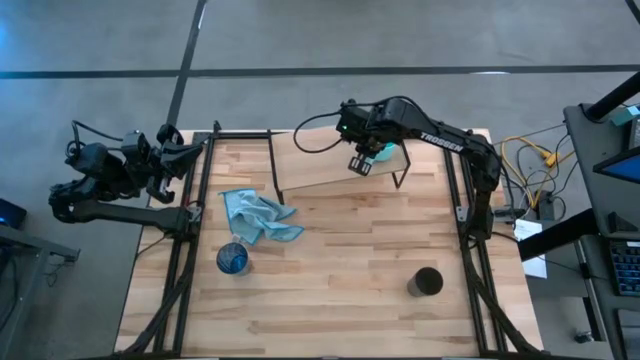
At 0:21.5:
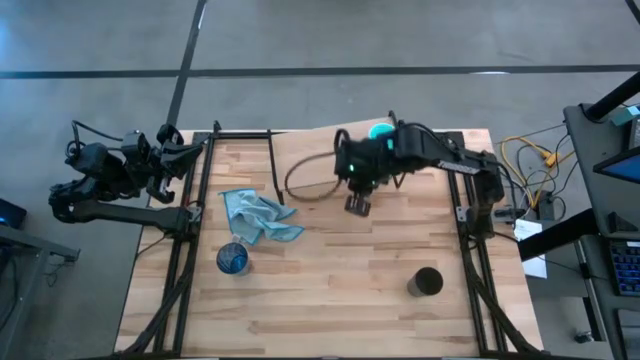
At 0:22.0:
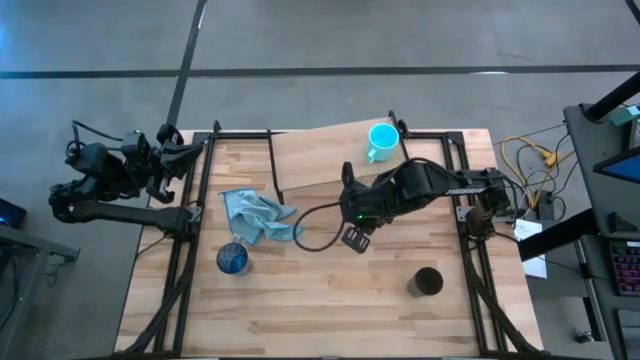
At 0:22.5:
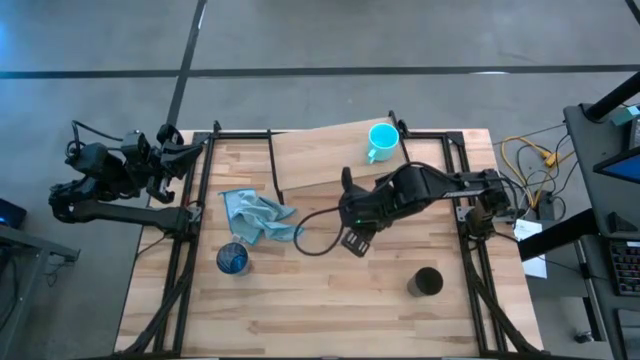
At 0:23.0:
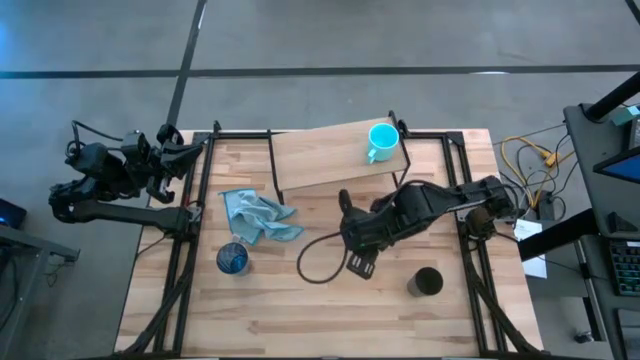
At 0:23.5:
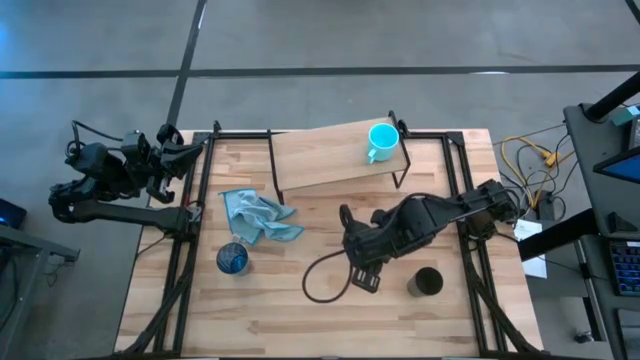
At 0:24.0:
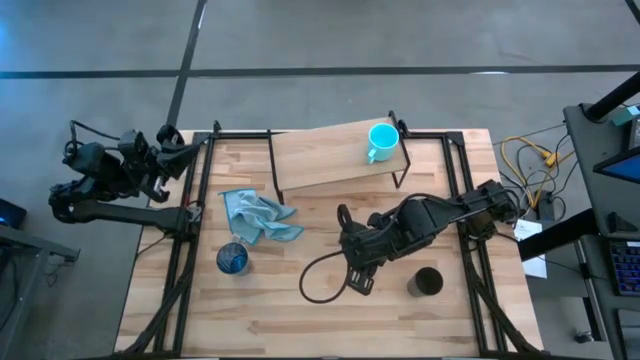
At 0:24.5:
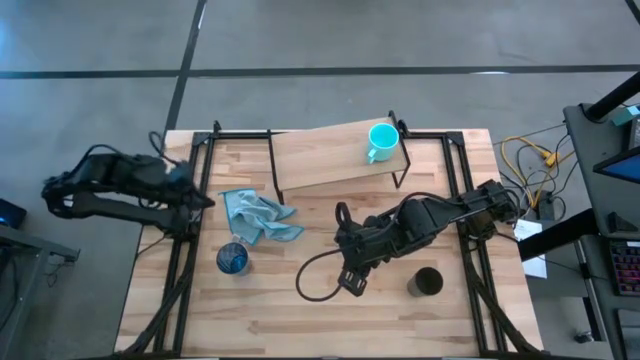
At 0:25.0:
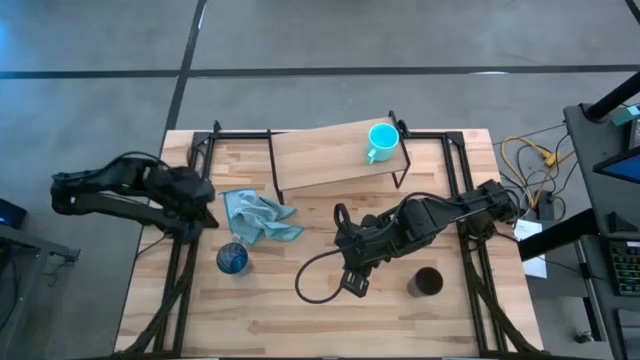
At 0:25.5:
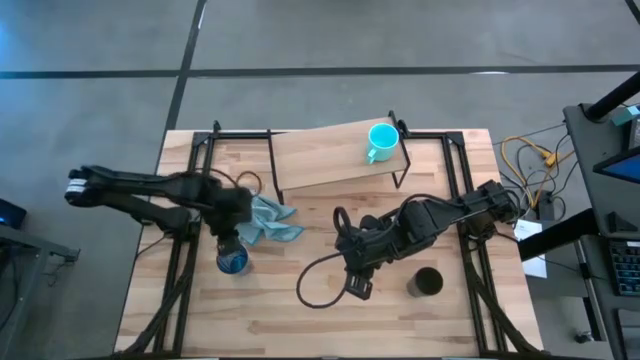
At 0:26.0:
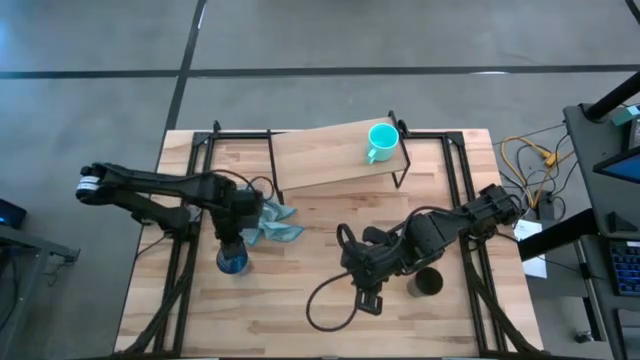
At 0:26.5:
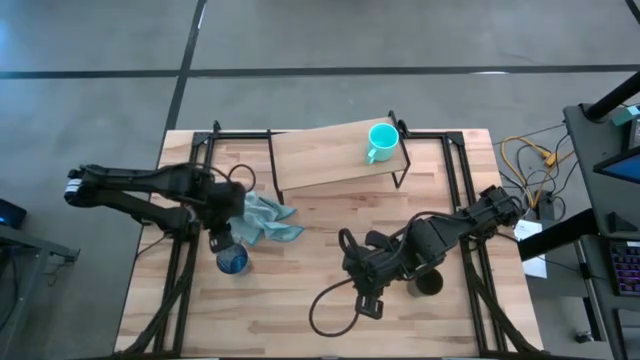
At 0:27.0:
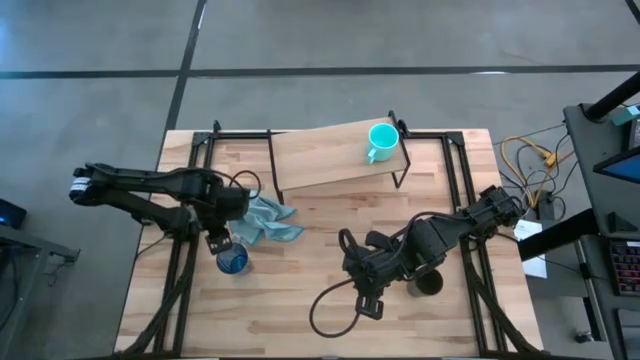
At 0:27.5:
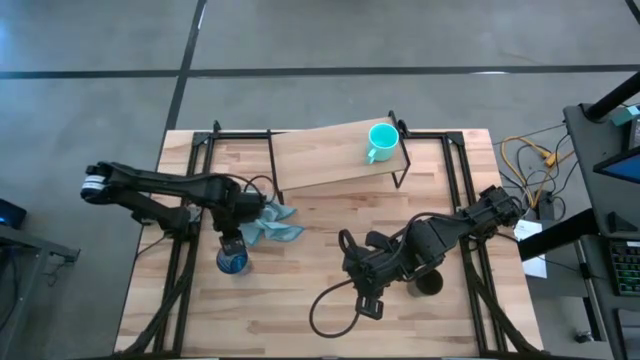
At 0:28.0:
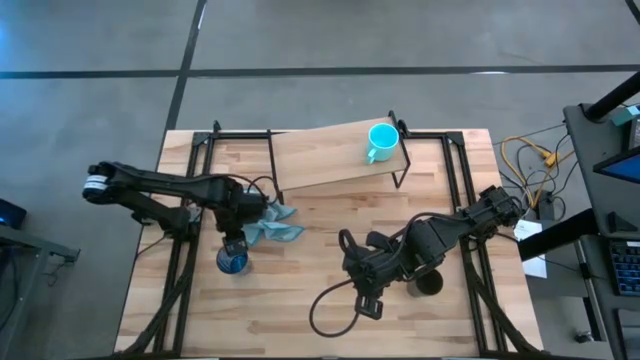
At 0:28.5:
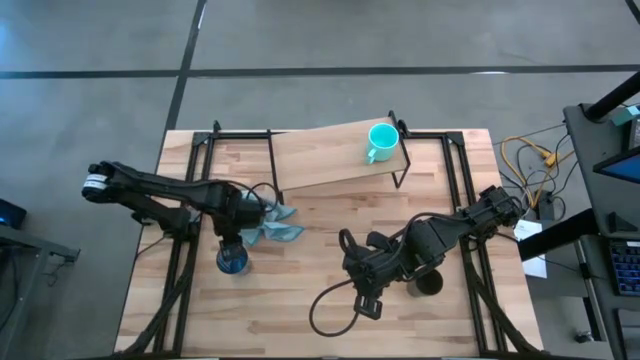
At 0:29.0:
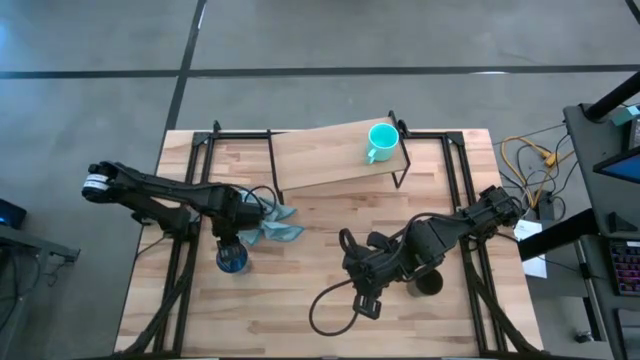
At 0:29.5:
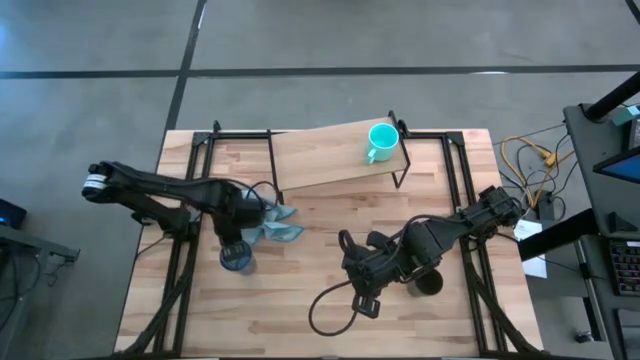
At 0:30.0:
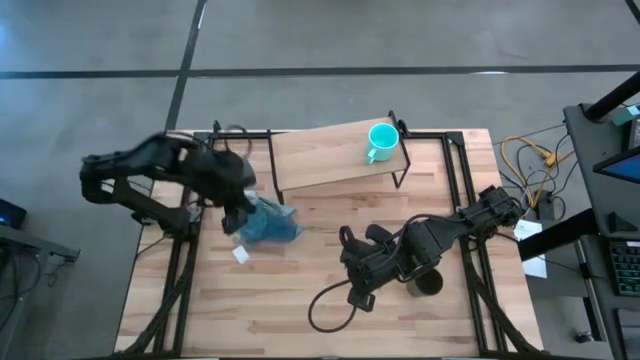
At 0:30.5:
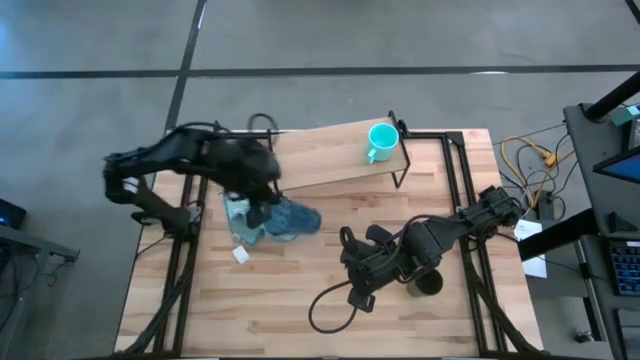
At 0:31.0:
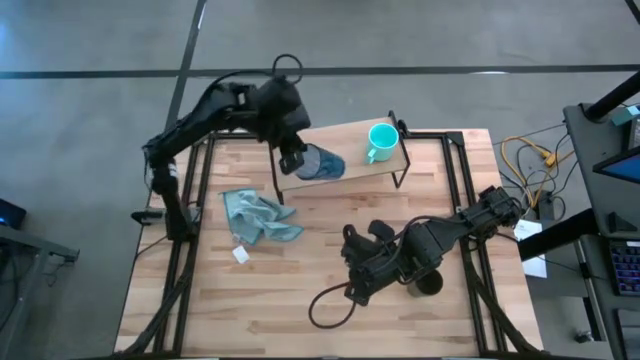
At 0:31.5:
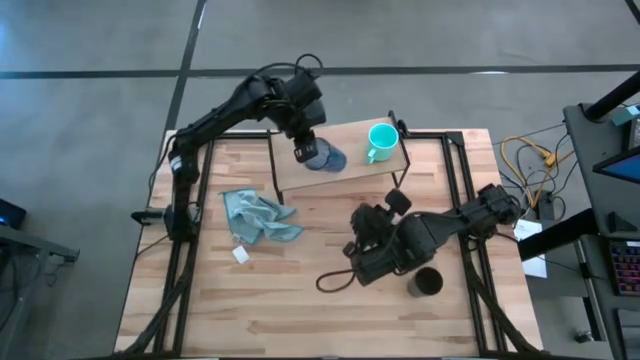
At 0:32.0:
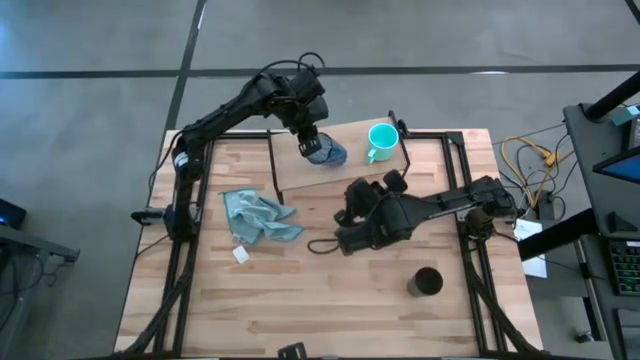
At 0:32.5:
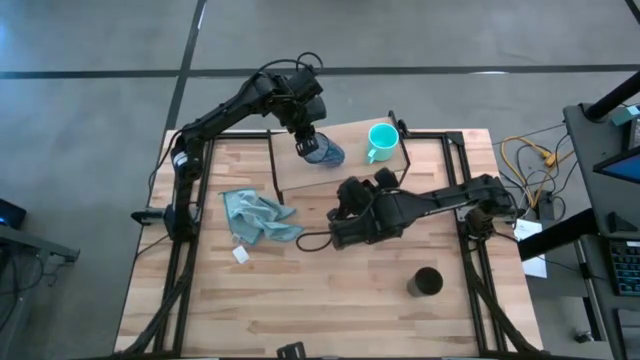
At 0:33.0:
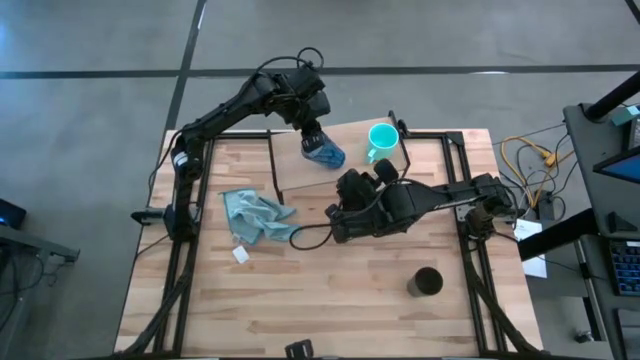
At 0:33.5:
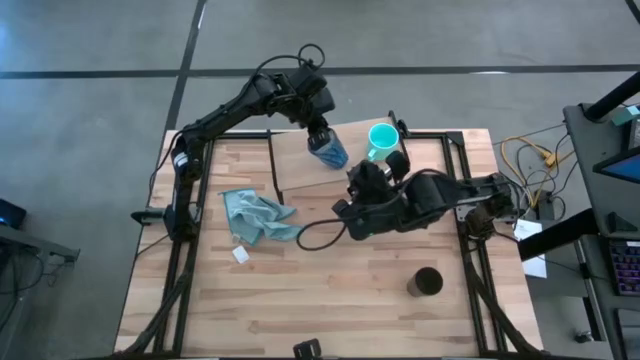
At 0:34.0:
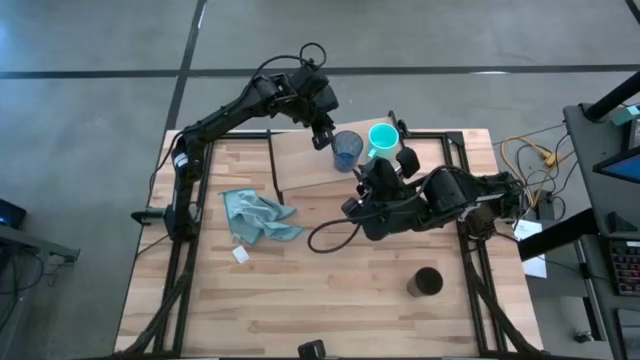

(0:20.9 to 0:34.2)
Task: Stack small to large cups/mugs on shelf
Put the blue cup on the shelf

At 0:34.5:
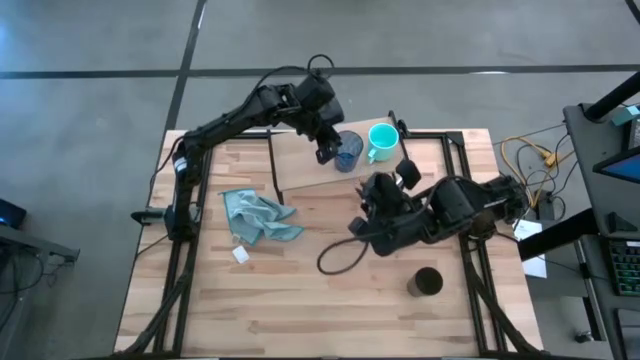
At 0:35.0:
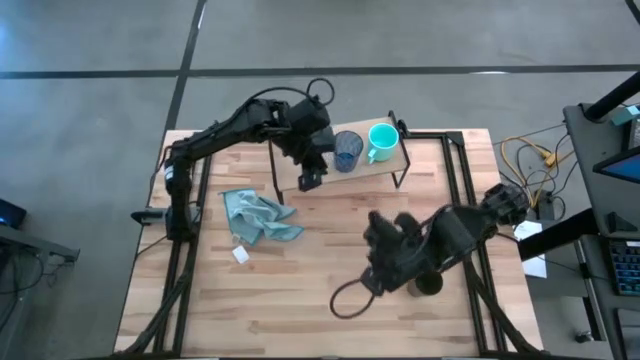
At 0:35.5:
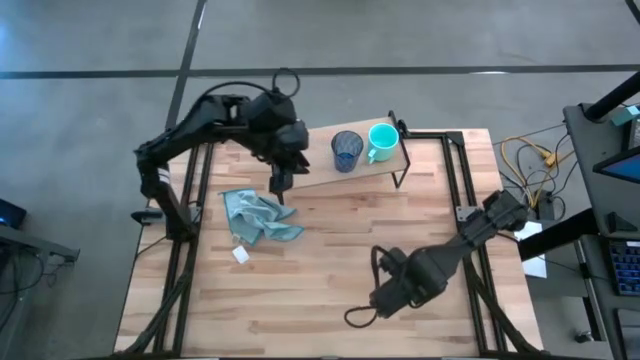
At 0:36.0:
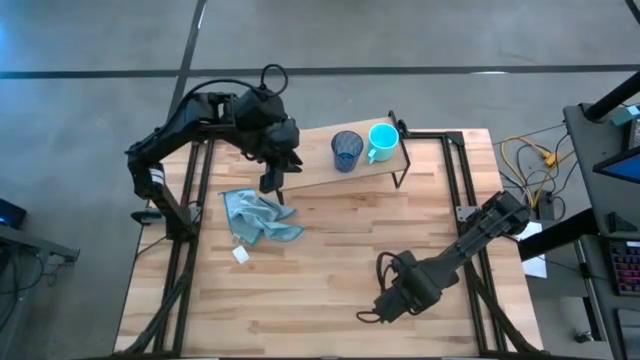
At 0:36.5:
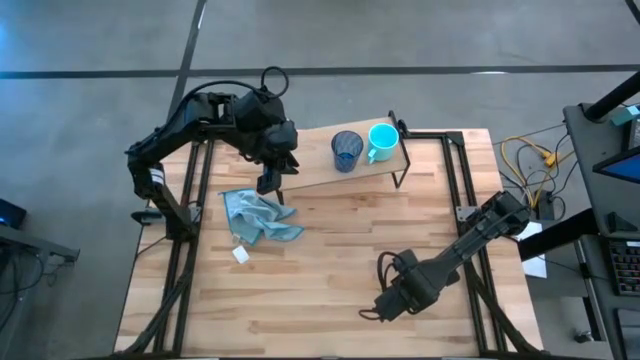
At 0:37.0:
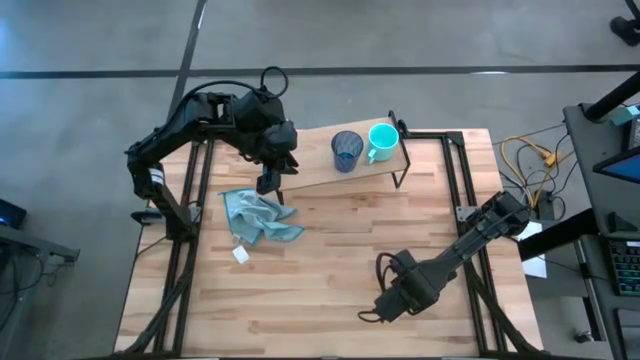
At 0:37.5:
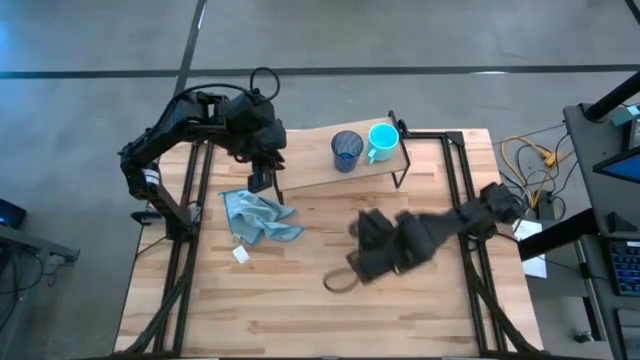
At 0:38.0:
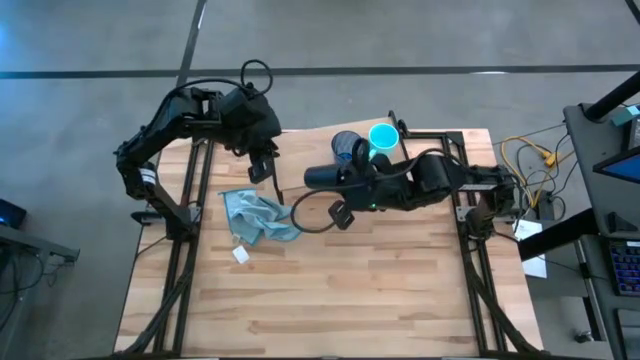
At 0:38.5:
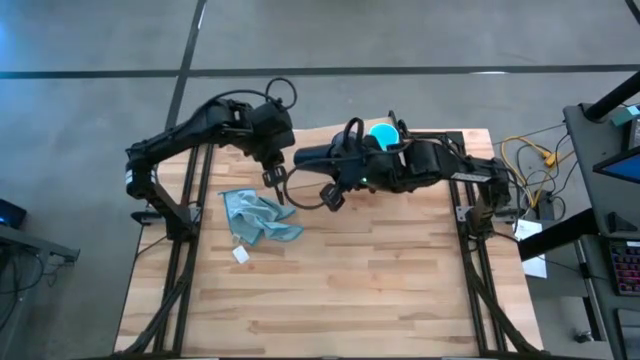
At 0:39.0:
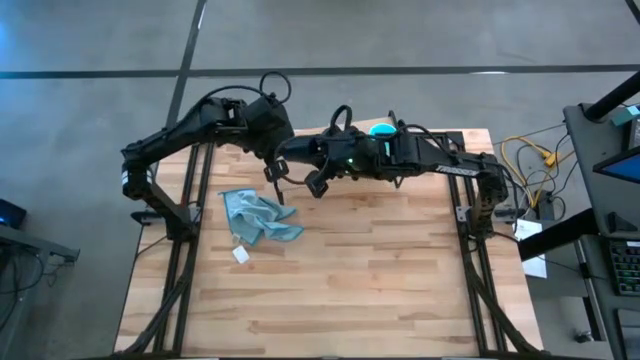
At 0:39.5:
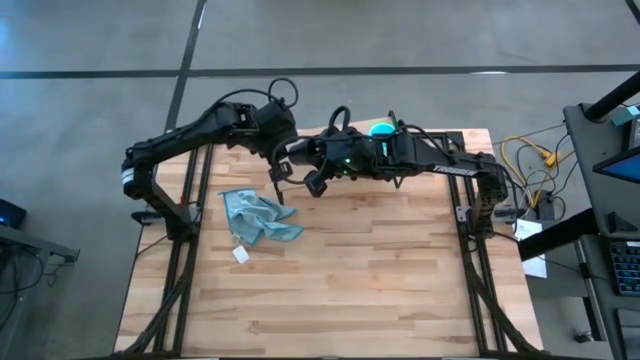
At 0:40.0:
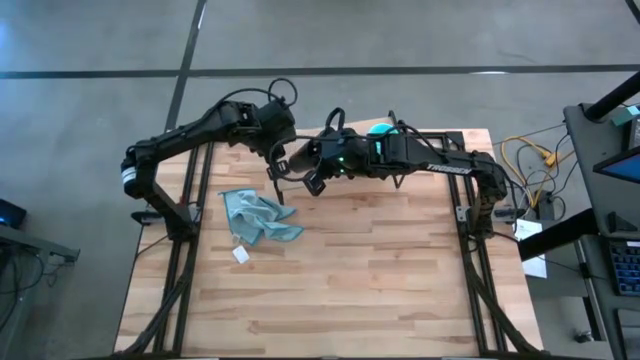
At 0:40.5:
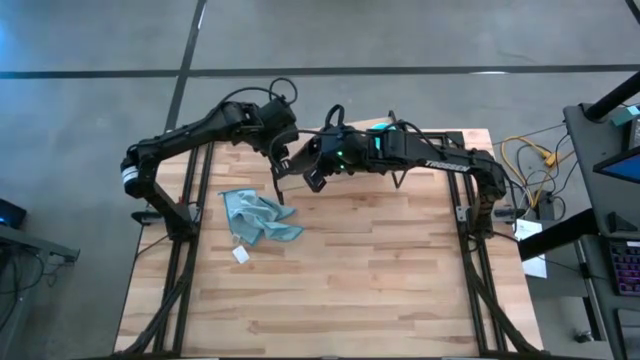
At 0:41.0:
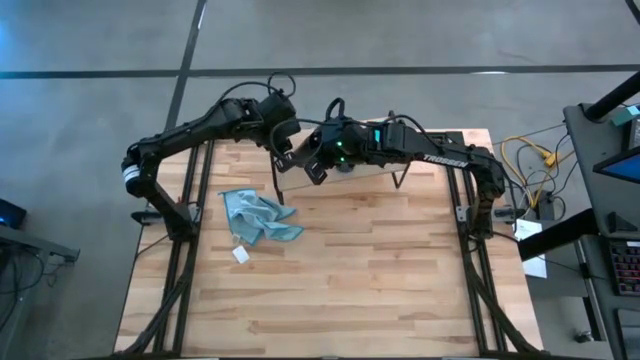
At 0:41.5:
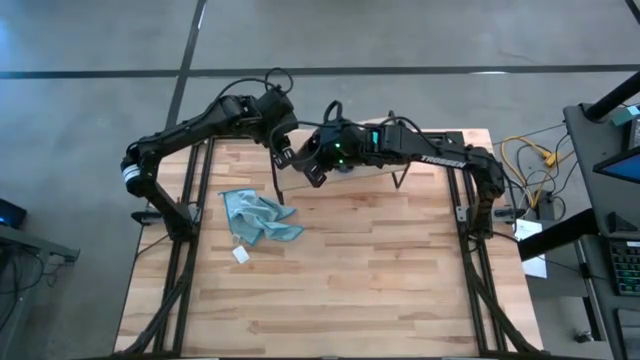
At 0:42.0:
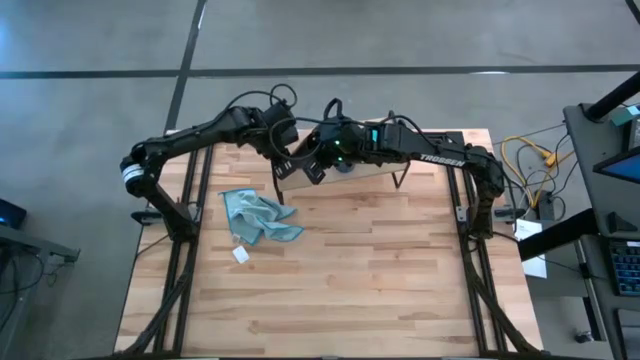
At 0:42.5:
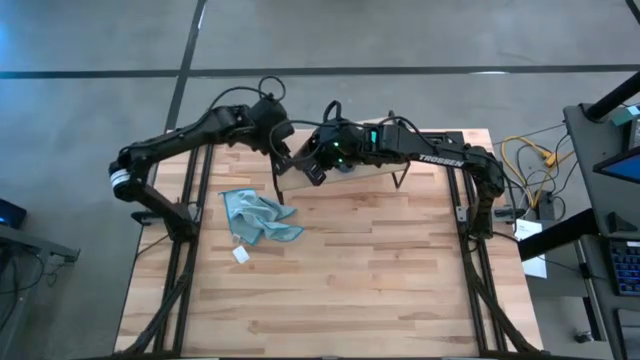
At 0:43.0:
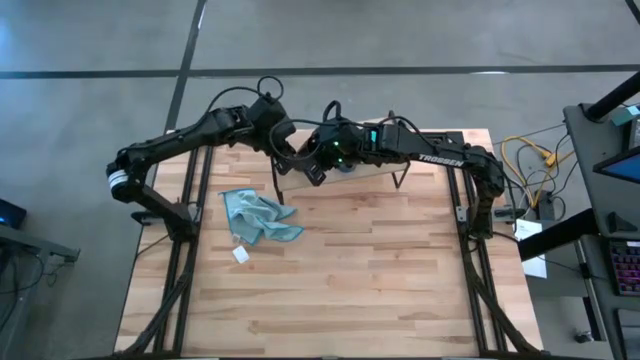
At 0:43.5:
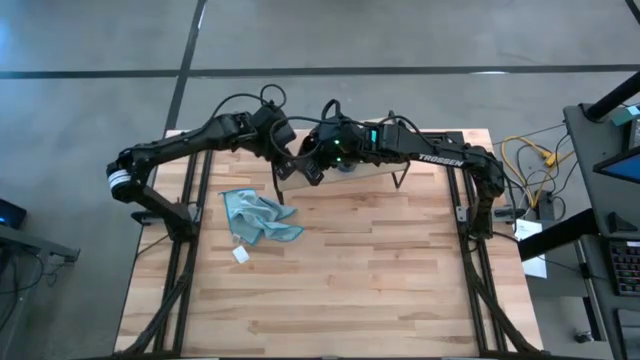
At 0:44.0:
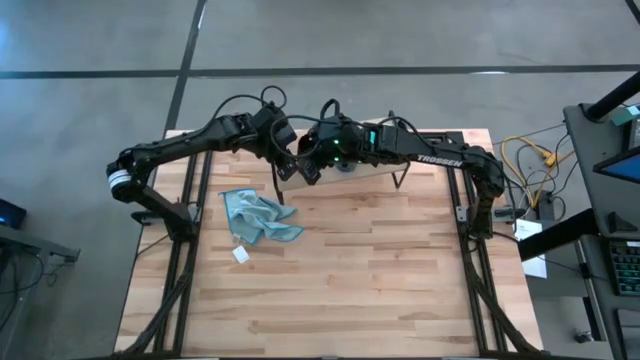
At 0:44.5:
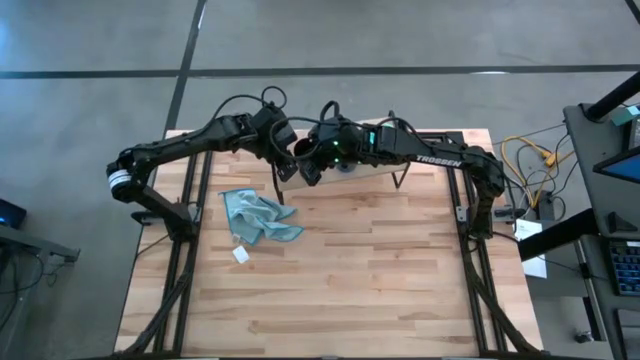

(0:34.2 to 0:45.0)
Put the black cup on the shelf
